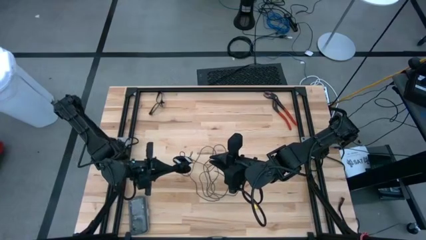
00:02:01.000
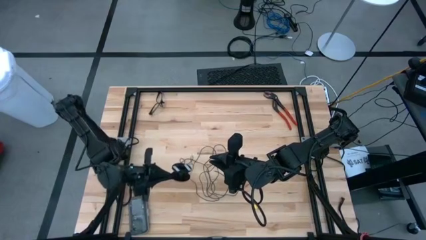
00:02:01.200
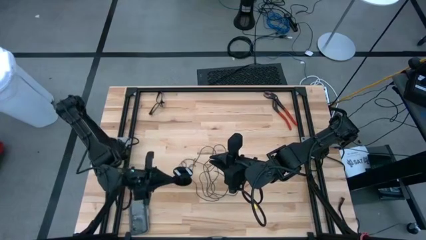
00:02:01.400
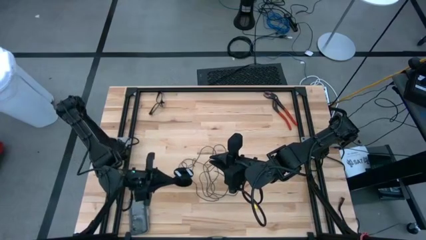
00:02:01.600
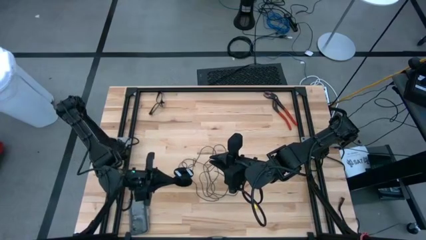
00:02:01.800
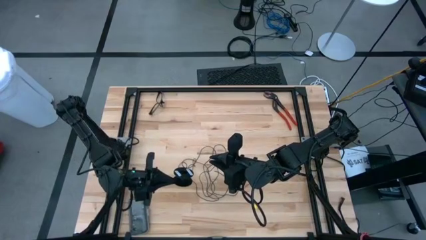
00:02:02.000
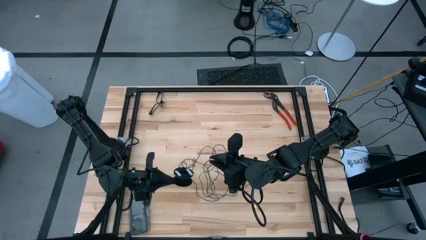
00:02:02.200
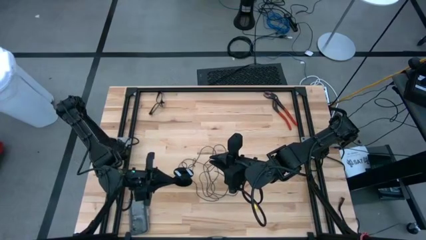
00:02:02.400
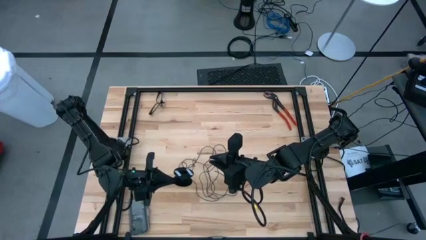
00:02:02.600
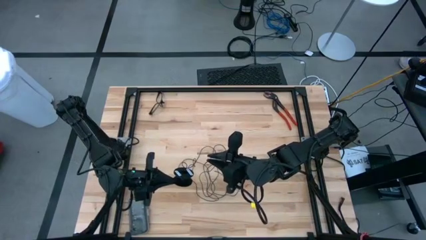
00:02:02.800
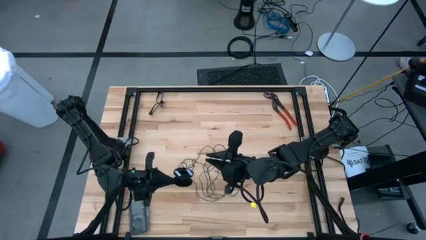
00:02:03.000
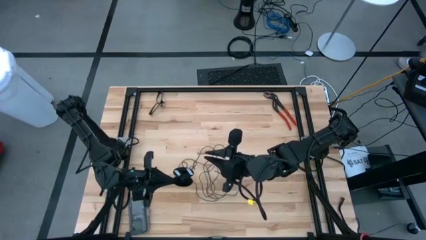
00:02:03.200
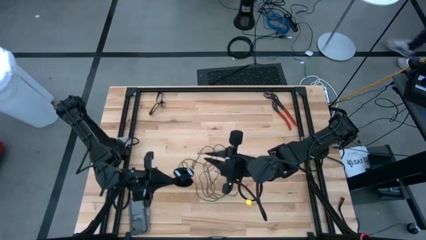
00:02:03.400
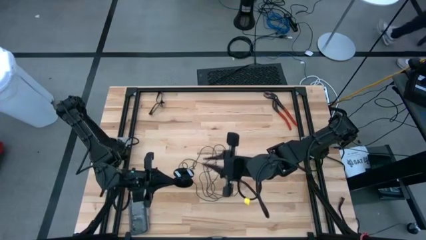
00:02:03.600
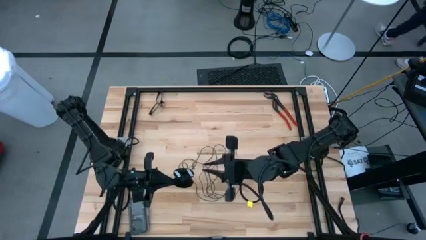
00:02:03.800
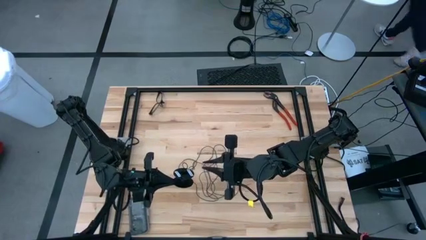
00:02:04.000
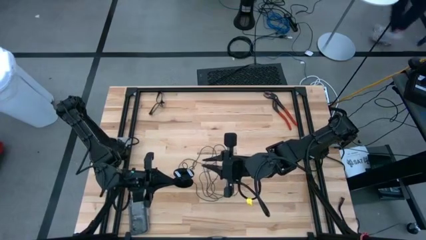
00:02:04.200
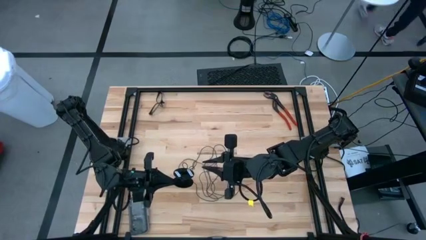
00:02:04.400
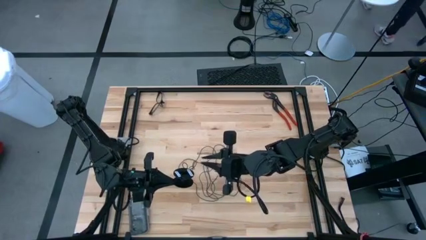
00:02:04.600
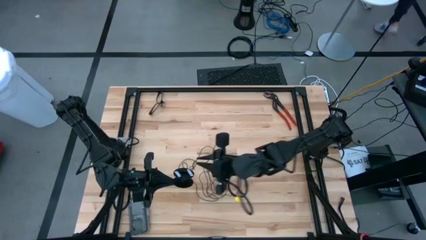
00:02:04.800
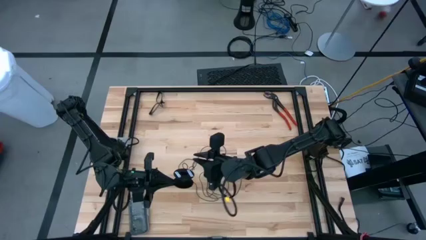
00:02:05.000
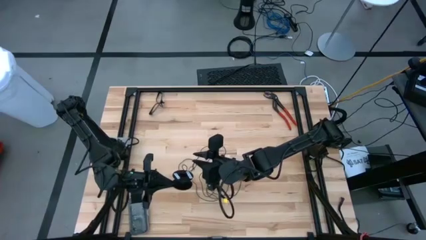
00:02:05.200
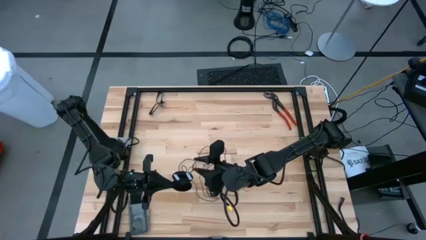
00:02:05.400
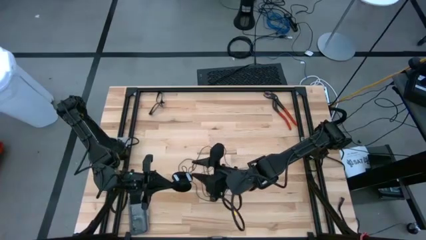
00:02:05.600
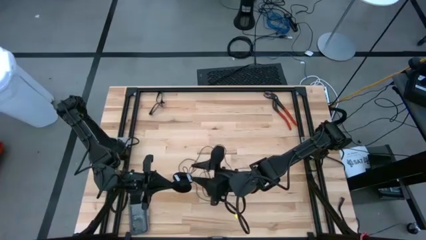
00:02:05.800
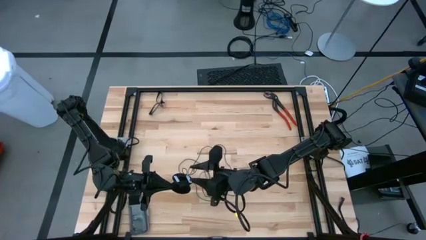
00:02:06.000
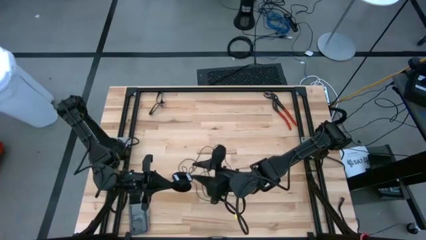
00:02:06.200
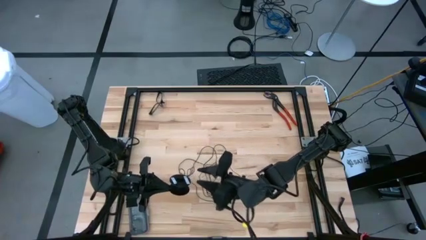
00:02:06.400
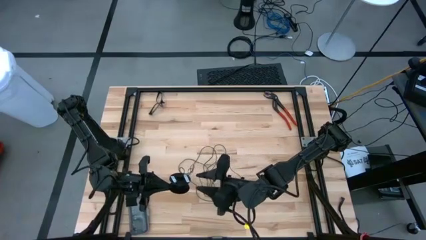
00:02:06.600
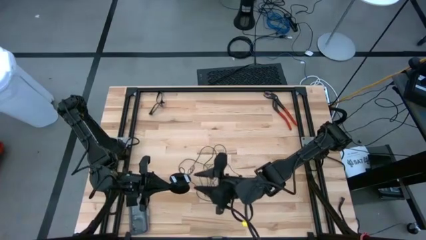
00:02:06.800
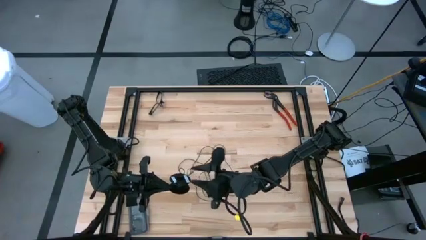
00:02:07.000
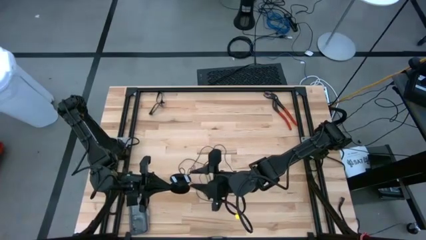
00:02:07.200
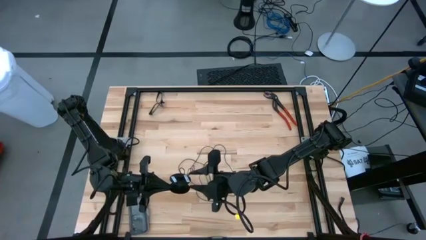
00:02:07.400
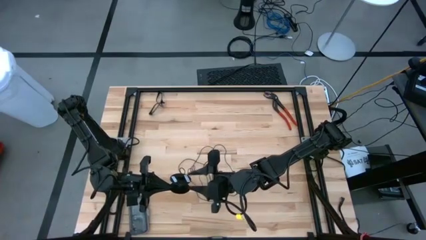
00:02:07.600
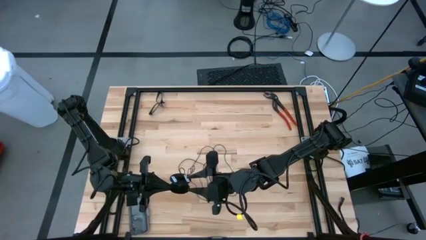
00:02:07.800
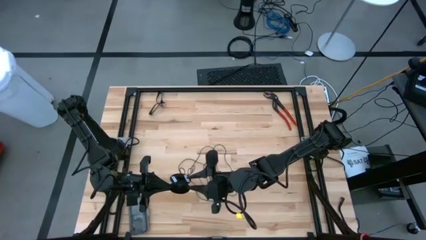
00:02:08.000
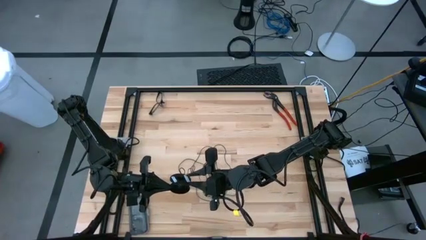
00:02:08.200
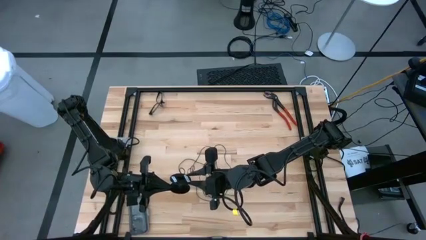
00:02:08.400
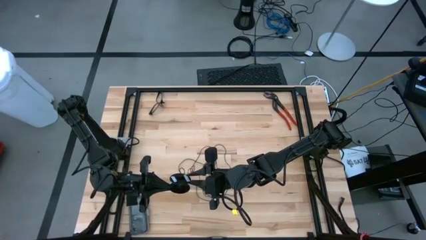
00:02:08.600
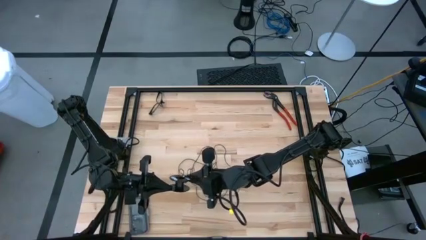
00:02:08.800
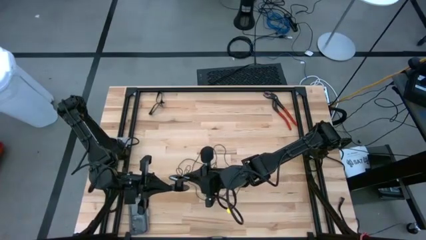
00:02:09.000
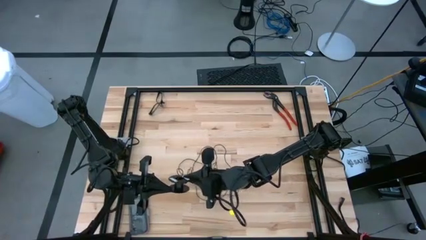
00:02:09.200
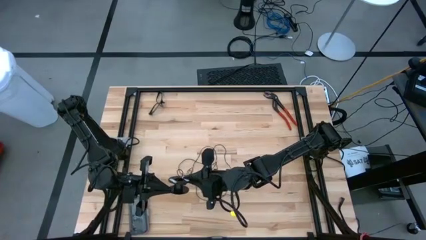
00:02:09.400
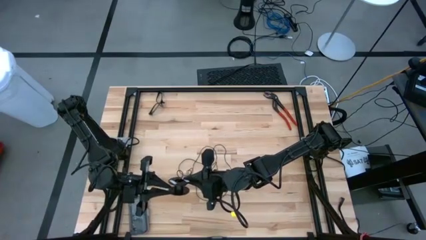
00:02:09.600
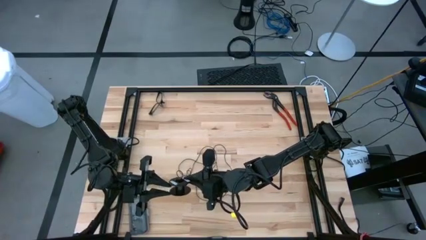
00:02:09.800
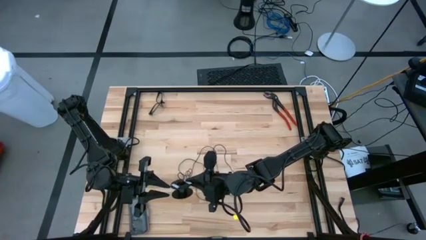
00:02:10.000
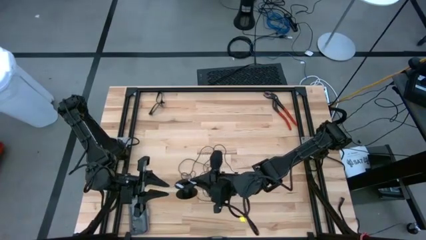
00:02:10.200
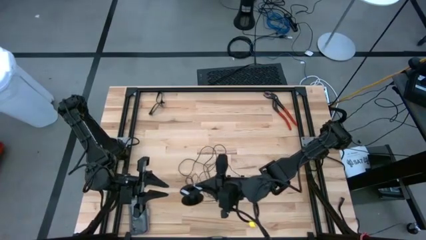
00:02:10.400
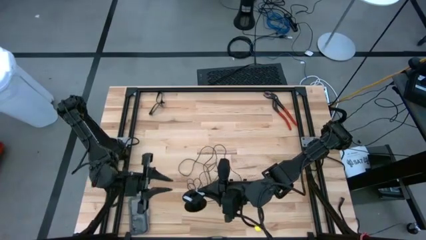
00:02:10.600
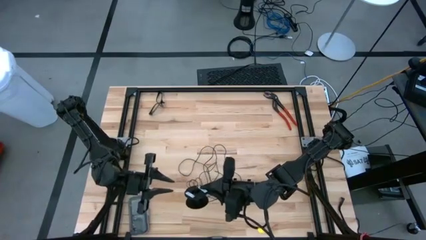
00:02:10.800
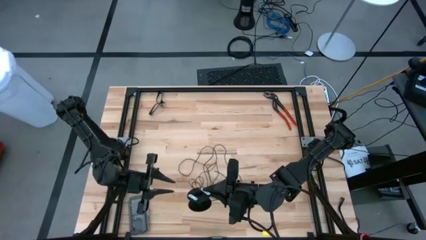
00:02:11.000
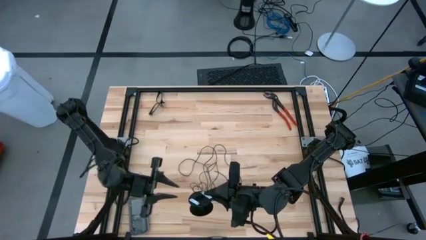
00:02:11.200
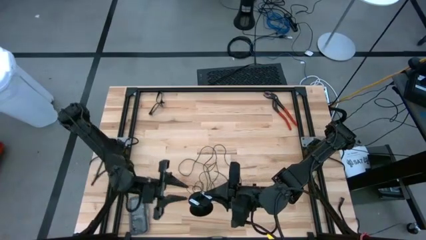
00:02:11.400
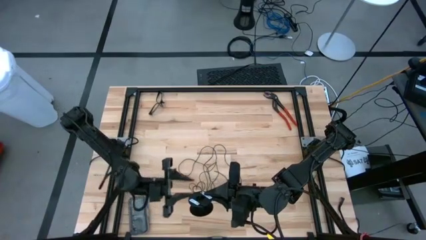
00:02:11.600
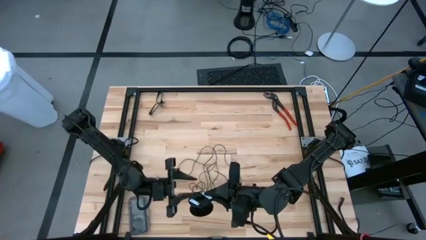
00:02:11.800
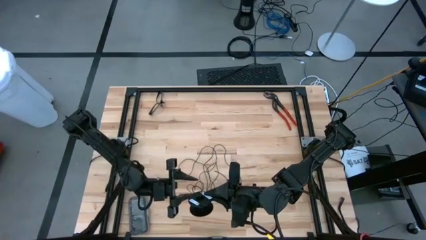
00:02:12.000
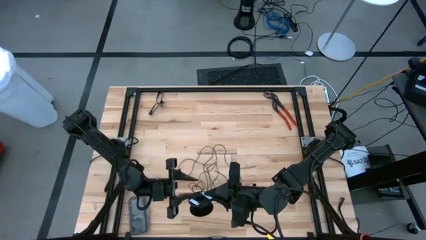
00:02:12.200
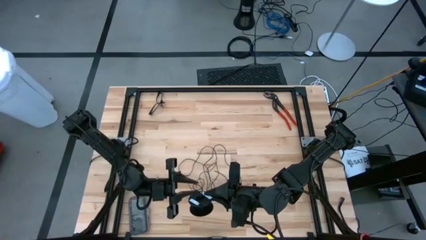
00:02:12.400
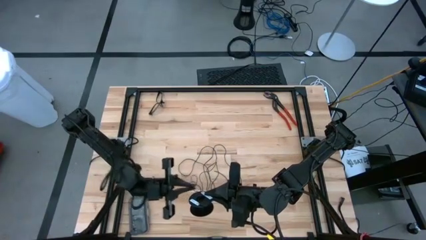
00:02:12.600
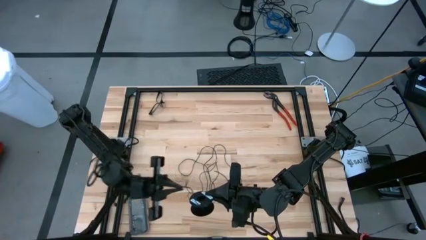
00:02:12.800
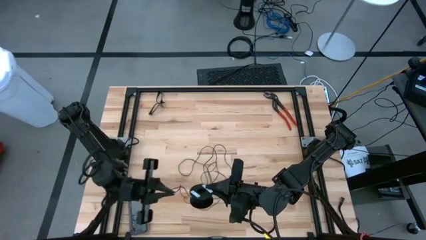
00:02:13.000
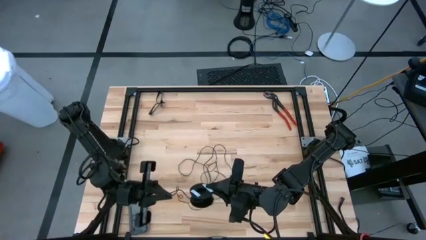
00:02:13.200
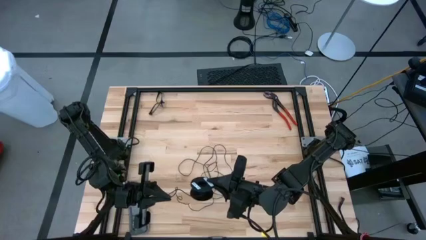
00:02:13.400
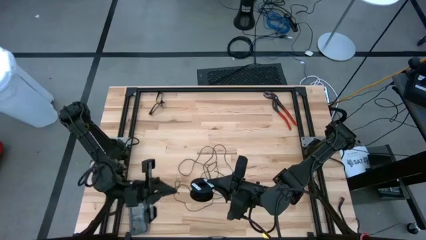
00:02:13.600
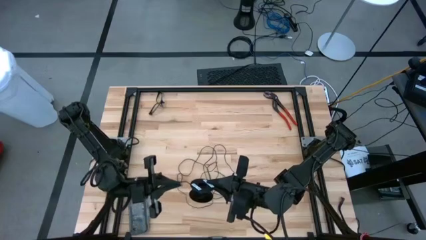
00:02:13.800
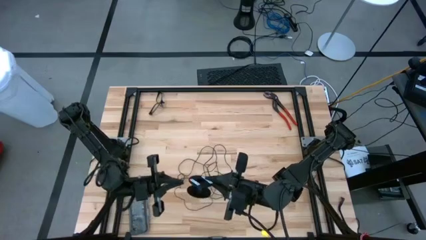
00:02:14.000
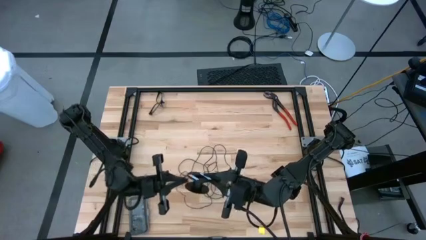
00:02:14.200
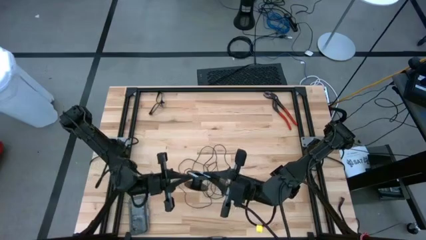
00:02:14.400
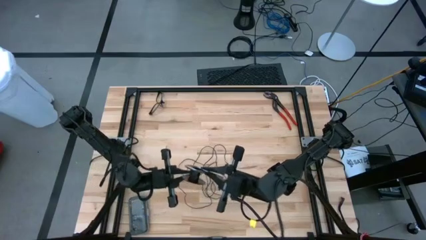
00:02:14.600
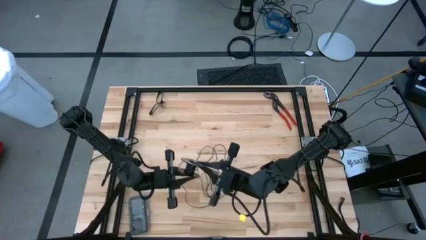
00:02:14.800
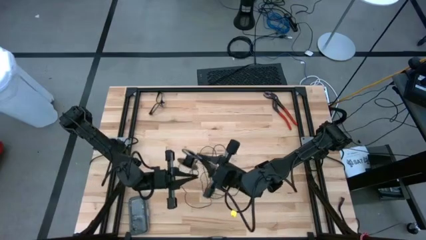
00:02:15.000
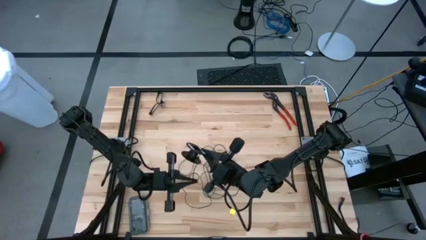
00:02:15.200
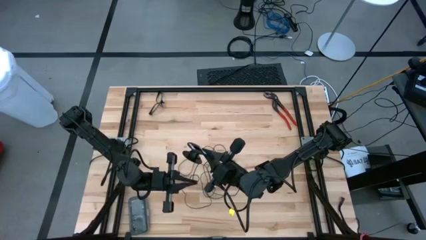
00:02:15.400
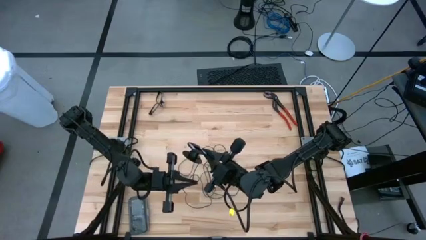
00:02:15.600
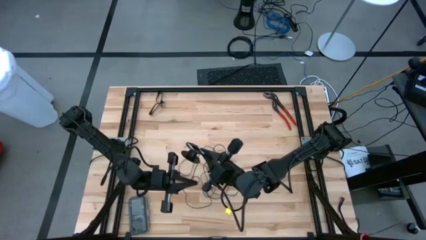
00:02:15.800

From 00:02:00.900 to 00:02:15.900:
Task: Coil cords
Coil the black wire onto the spool

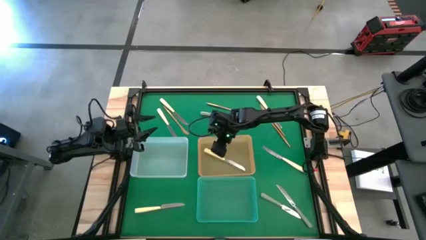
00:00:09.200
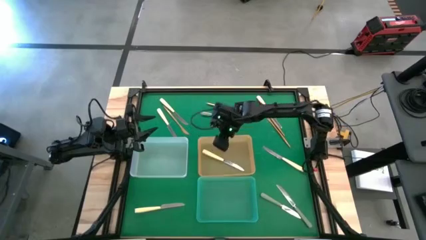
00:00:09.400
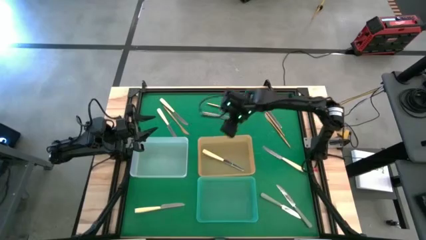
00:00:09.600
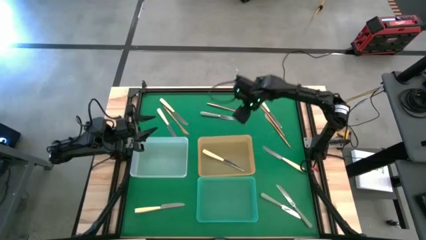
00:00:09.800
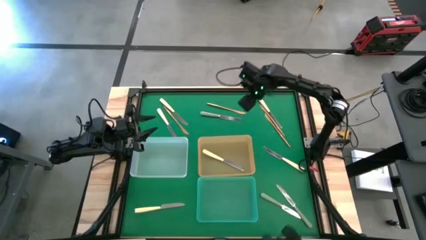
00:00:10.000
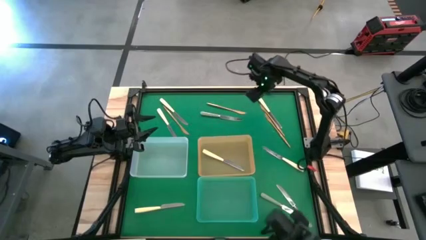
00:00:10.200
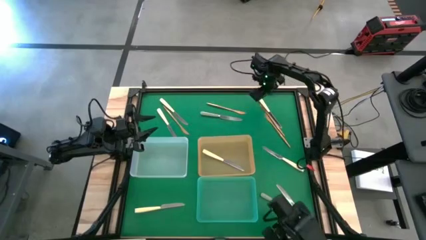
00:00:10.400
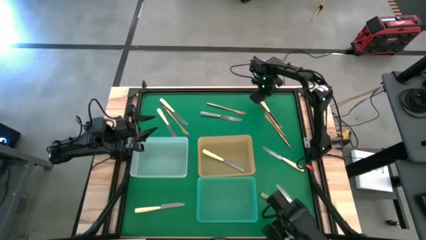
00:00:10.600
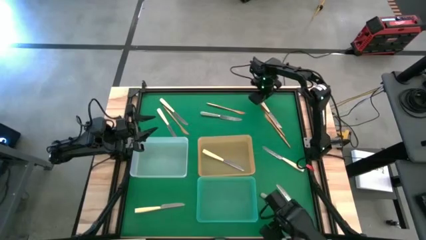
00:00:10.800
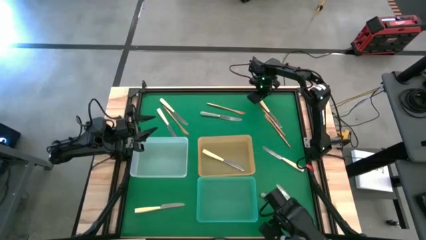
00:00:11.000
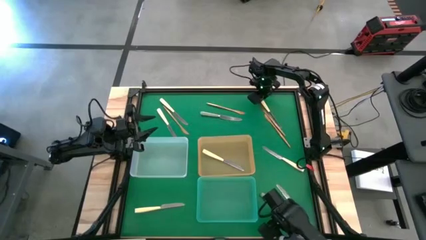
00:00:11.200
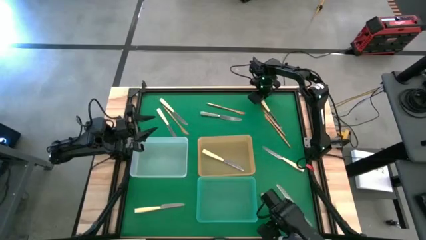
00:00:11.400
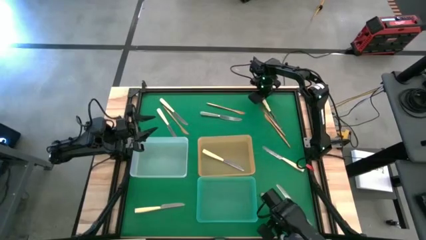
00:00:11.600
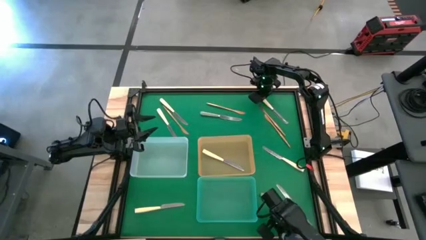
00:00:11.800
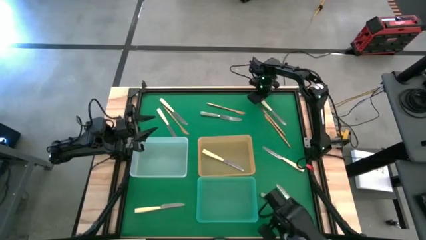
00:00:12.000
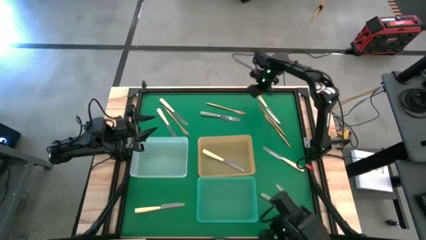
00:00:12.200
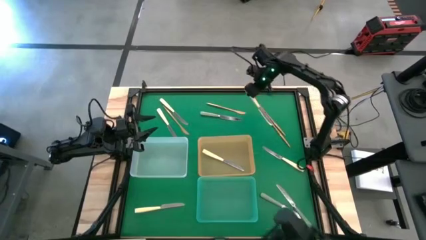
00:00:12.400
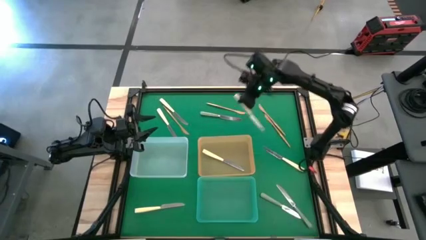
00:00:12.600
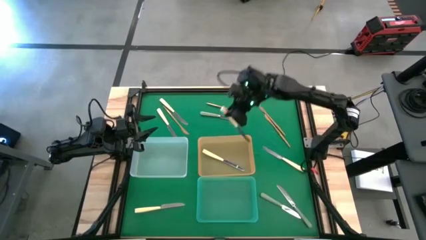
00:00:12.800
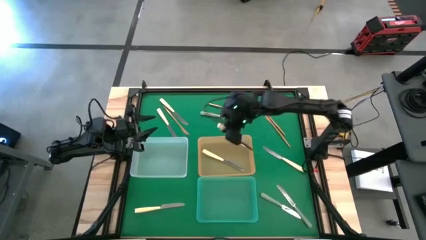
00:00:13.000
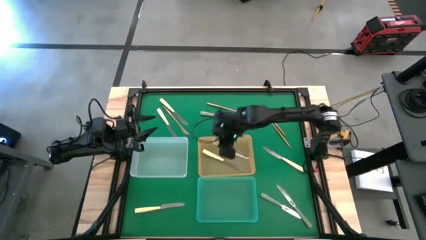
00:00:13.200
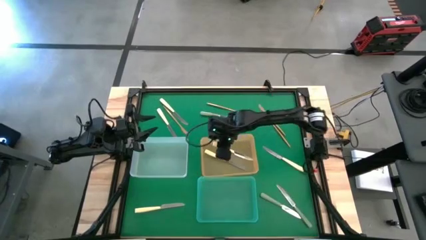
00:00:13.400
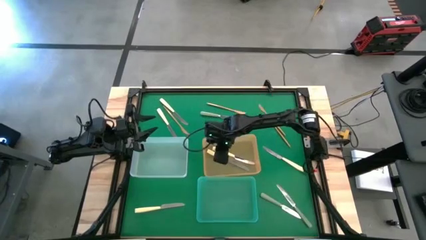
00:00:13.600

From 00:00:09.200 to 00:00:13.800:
Task: Sort silverware by color (type)
Put the yellow table knife into the orange bin
